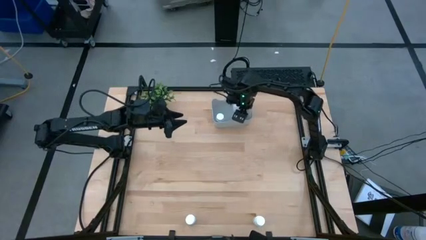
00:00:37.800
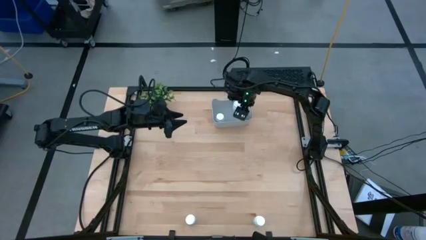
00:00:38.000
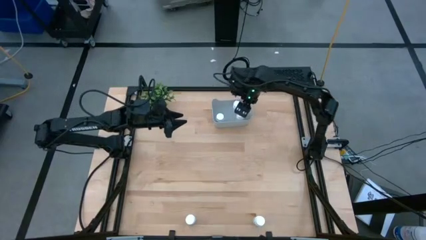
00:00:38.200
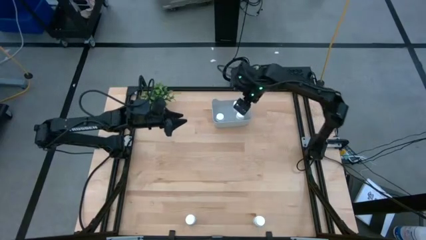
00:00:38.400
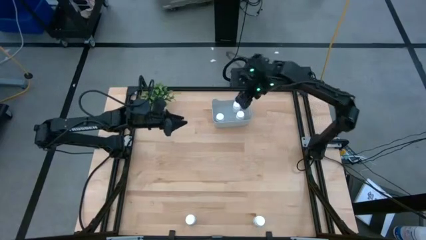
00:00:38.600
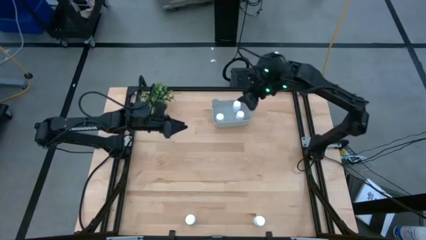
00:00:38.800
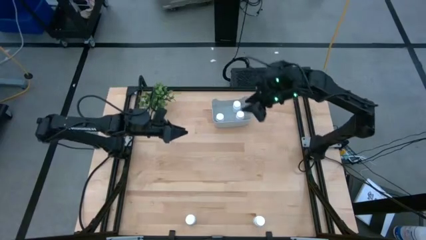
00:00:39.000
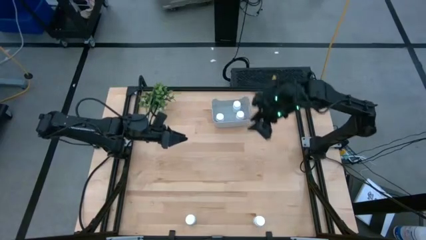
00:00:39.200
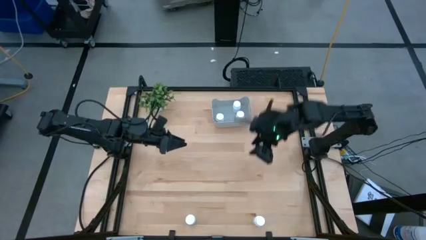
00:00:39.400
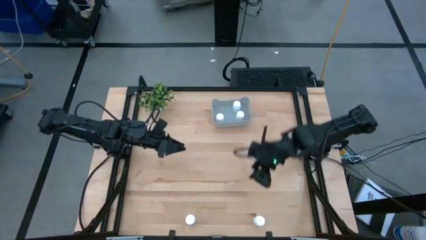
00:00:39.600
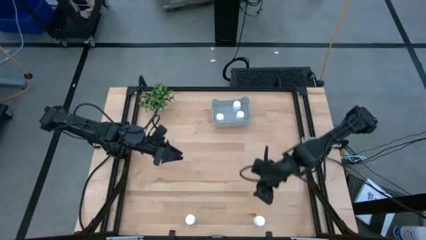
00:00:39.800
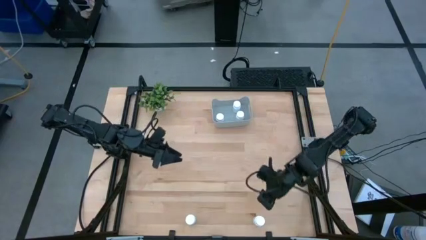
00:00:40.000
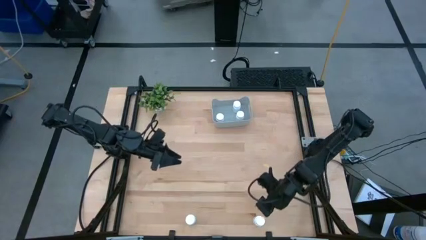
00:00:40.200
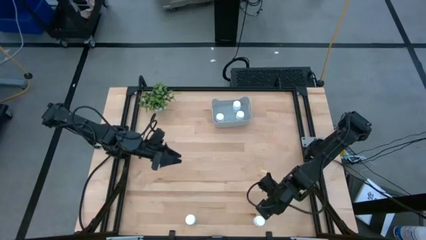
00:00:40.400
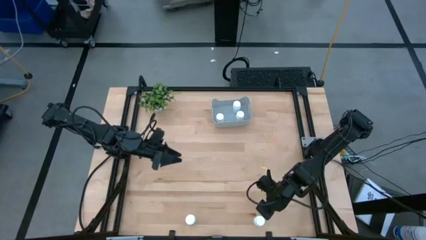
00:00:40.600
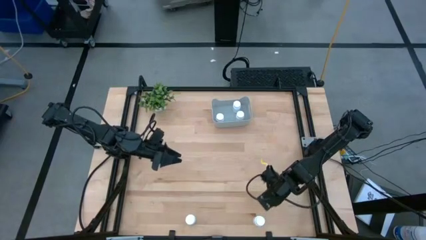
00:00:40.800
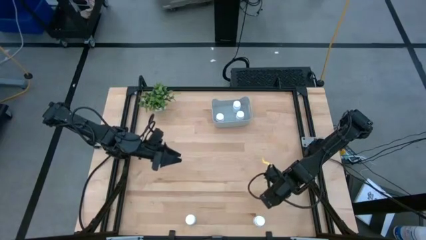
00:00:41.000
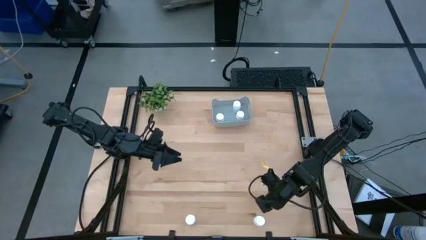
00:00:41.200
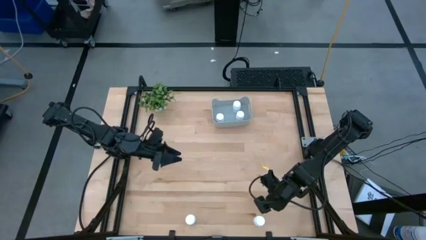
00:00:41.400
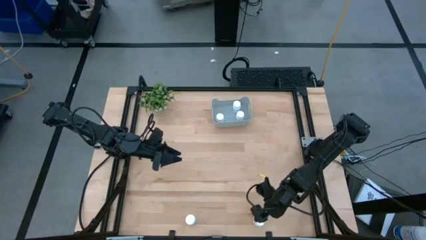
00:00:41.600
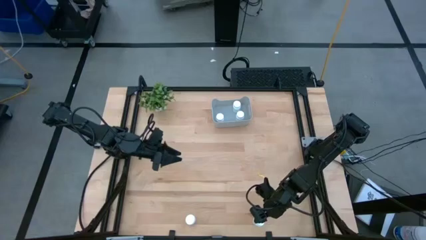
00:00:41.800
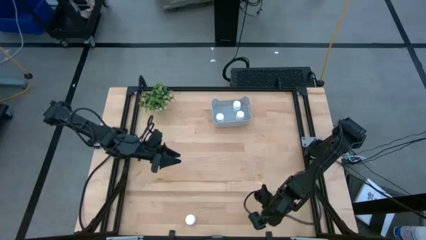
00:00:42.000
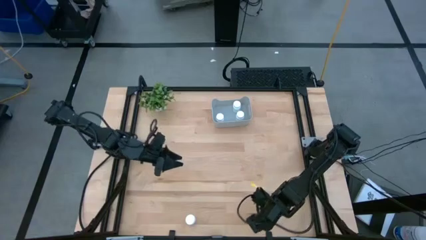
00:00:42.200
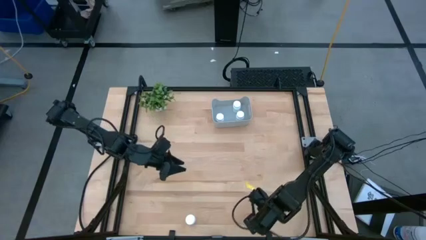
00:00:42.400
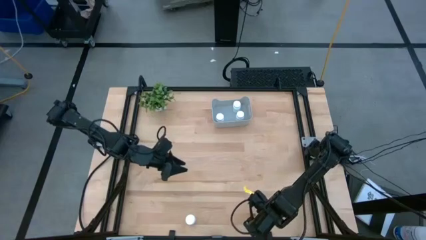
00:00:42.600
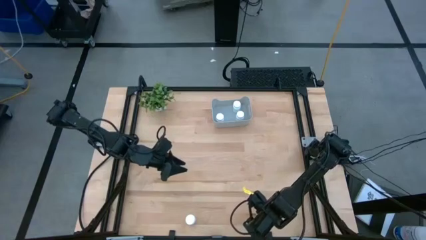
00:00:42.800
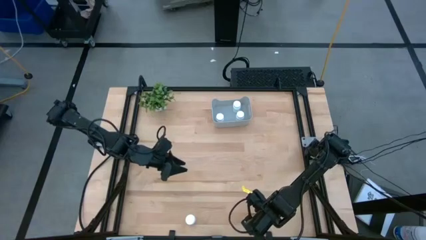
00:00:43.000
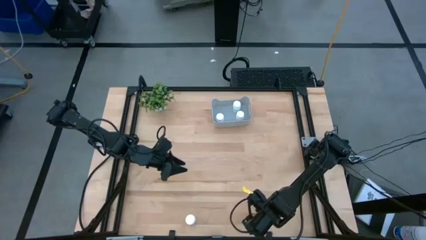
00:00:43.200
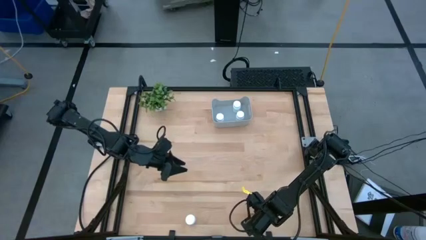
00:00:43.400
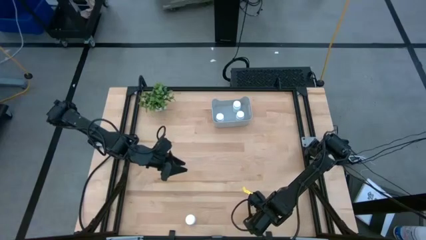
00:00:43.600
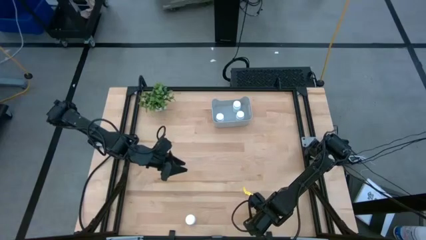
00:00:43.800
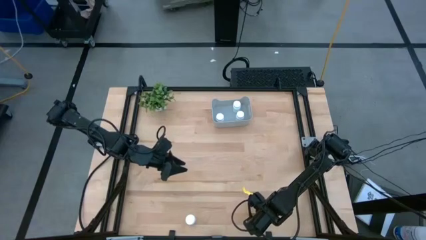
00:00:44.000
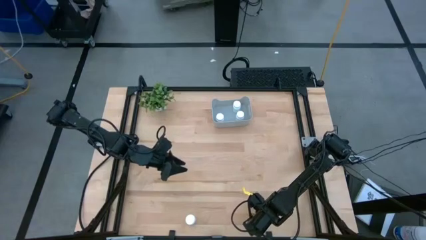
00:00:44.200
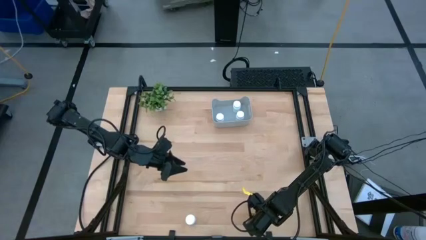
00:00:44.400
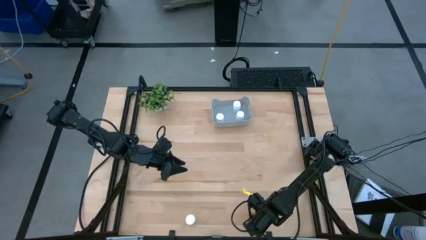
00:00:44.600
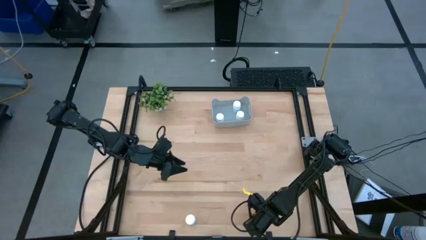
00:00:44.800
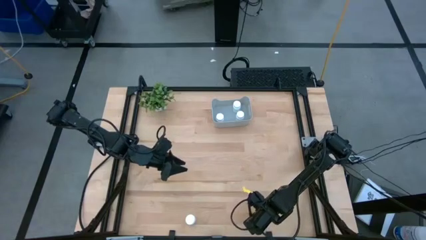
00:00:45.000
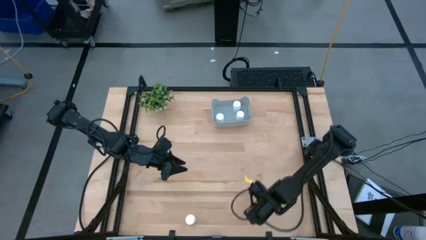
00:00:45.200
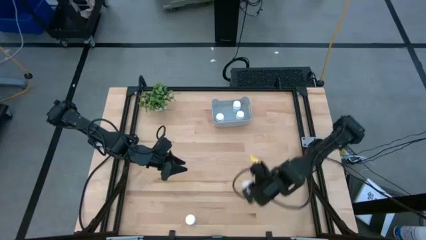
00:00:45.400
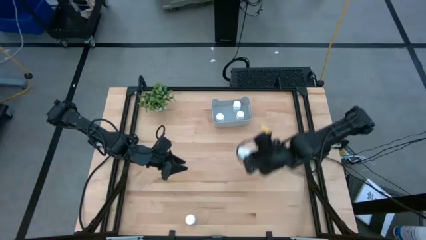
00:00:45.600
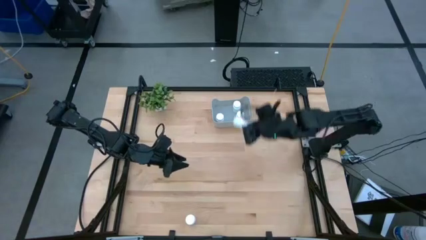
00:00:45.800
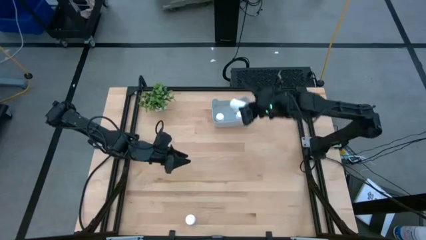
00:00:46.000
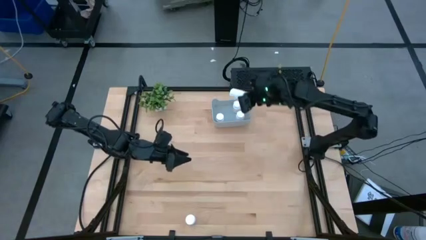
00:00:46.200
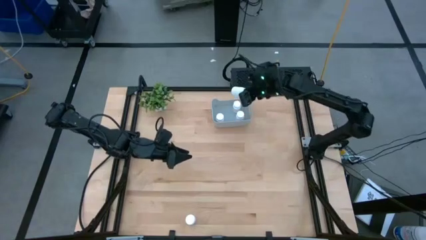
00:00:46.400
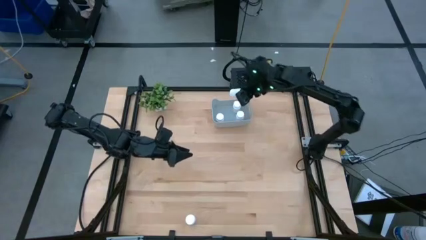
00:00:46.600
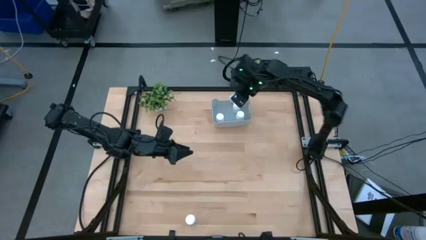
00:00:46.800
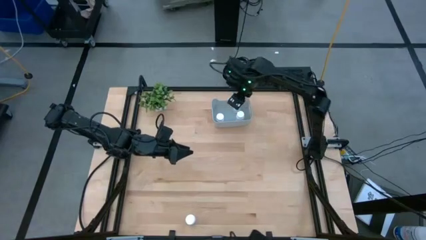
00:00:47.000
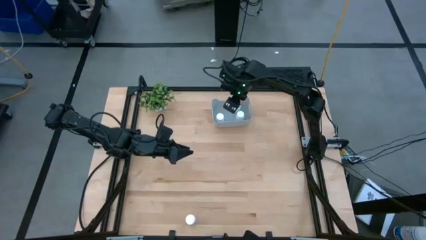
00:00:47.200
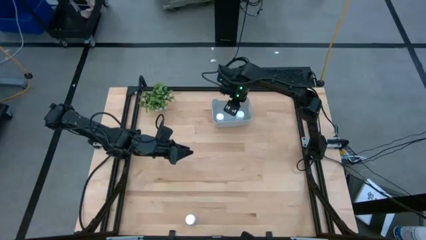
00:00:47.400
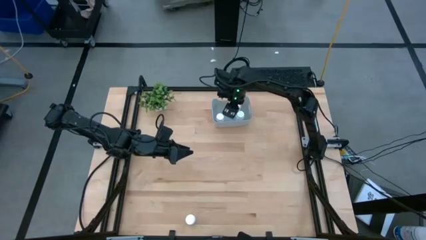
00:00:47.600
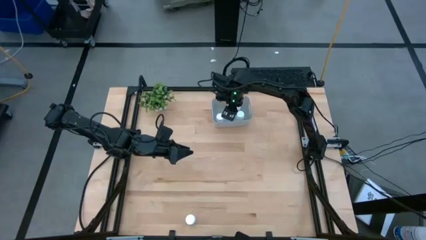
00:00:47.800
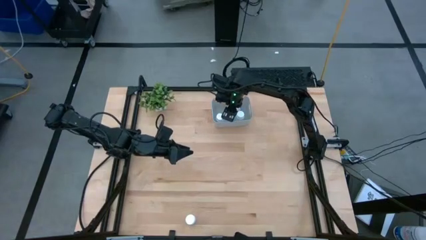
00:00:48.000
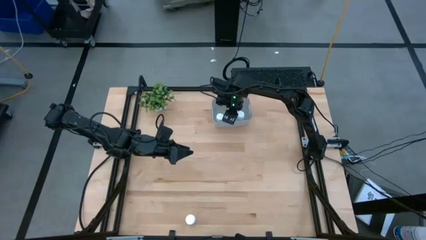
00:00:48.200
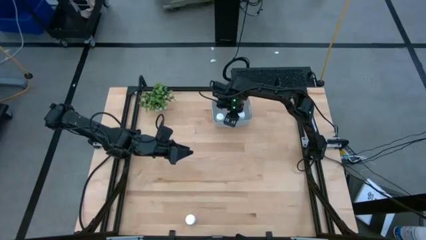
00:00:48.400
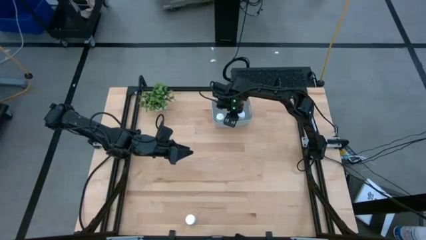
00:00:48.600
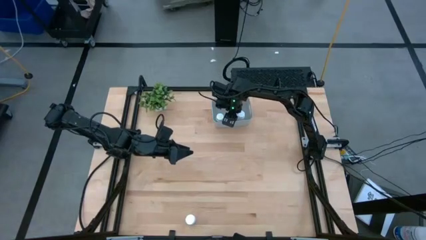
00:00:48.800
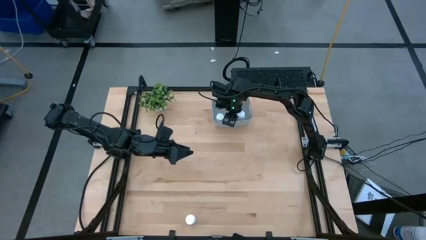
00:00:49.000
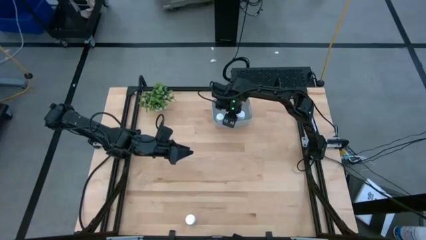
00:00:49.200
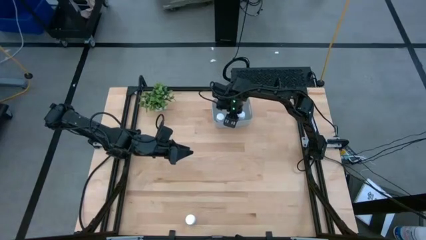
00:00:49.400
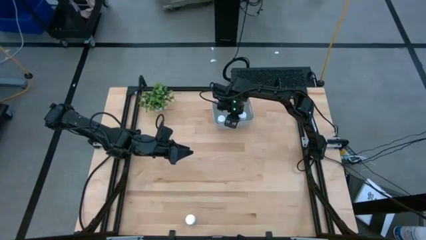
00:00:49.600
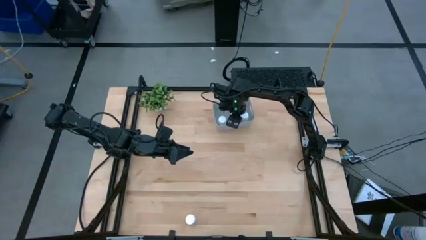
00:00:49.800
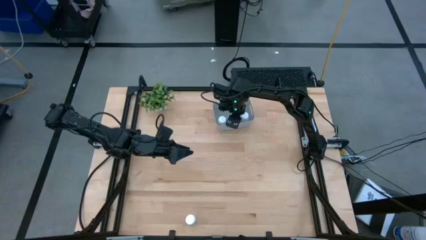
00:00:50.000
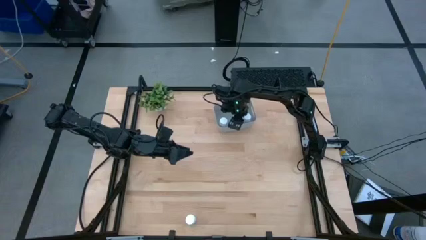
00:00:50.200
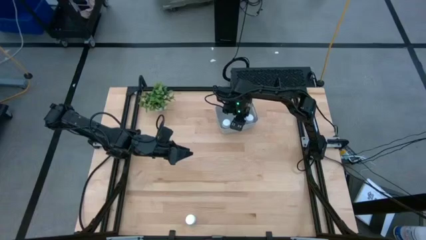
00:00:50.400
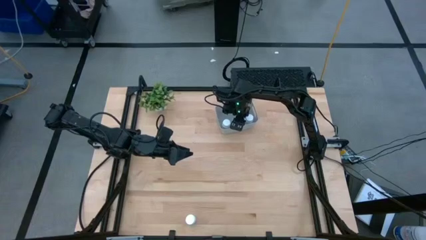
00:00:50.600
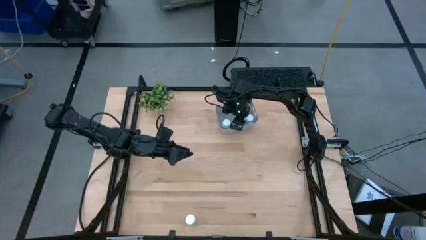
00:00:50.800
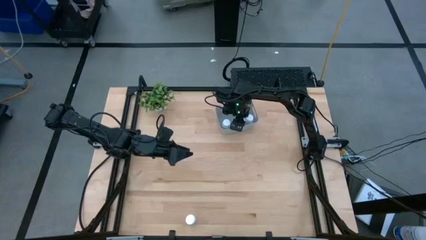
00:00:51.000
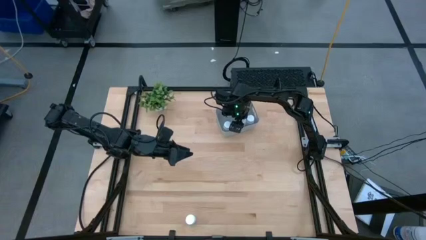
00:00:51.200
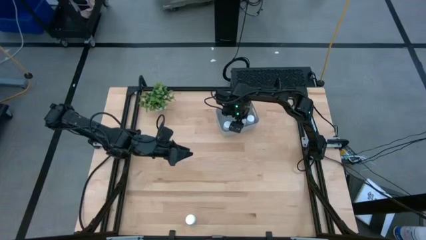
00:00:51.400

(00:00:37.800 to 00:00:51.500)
Task: Pick and place pill bottles into a basket
Put the white pill bottle into the gray container
